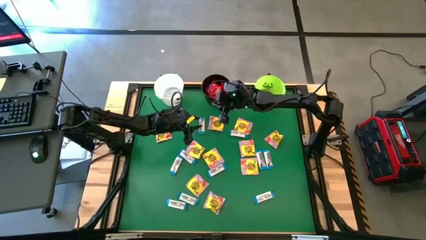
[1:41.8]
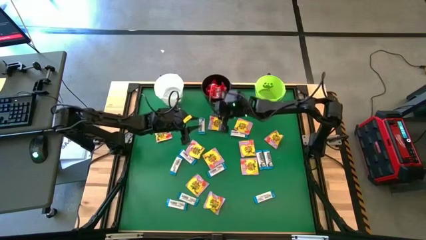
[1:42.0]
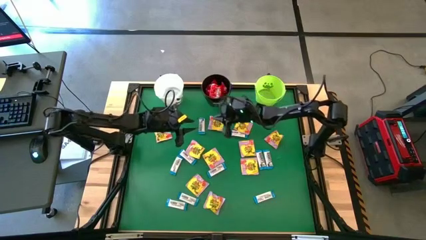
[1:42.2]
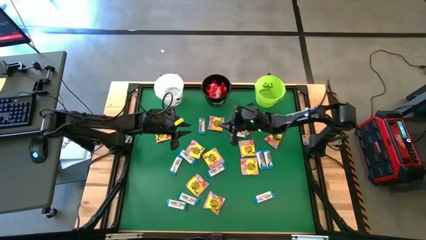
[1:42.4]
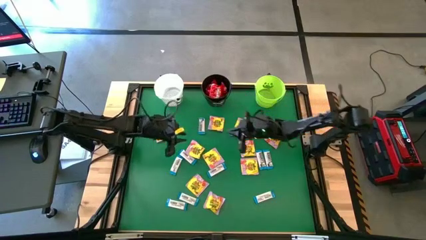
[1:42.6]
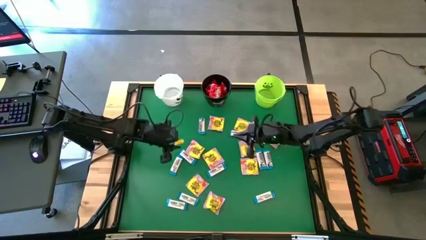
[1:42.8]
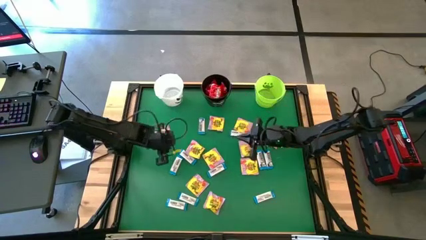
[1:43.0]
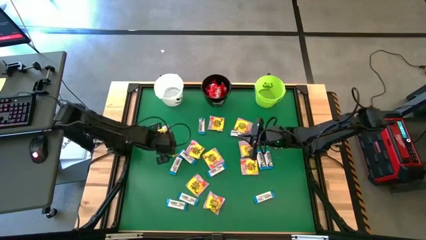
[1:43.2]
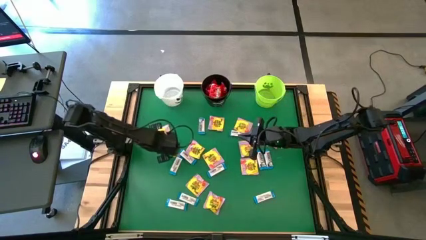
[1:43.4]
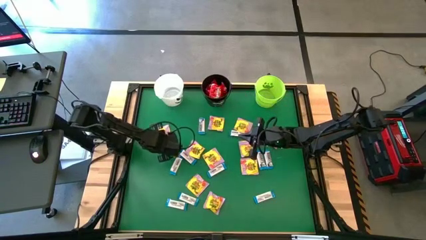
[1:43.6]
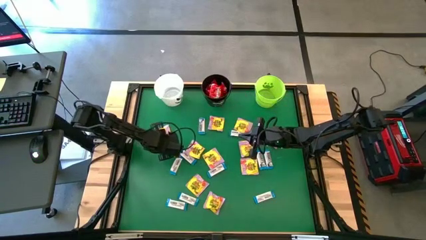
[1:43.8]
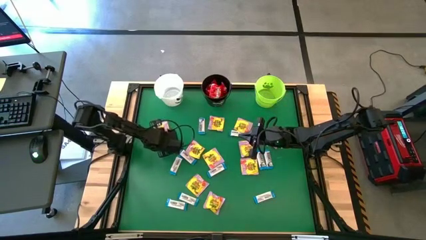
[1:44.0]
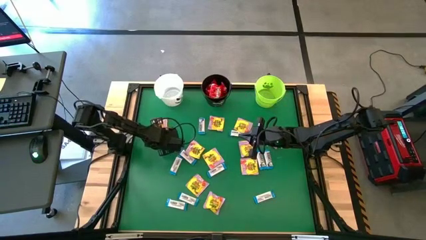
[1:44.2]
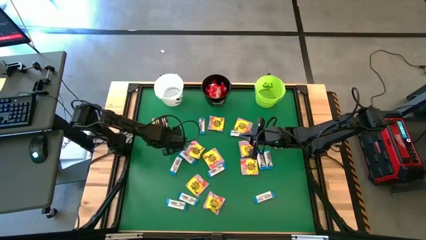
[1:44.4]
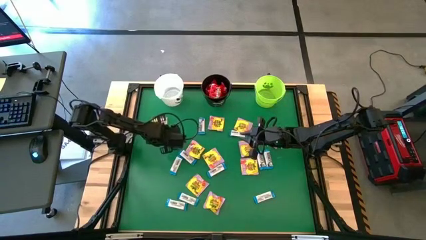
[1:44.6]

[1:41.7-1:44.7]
Task: Sort candy by brand, put in halloween buckets
Put the yellow candy into the green bucket

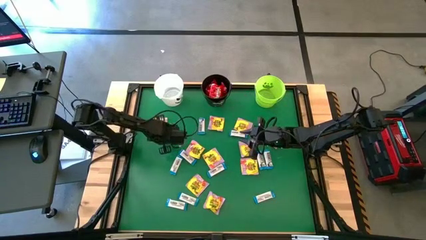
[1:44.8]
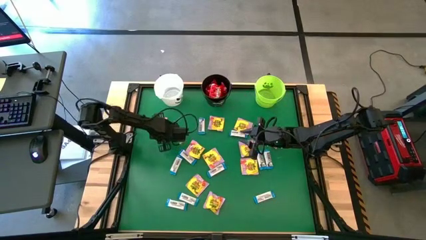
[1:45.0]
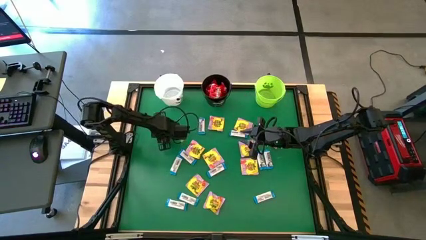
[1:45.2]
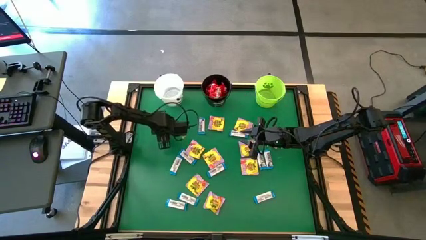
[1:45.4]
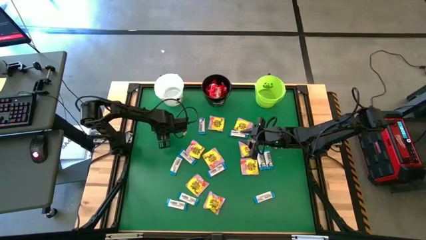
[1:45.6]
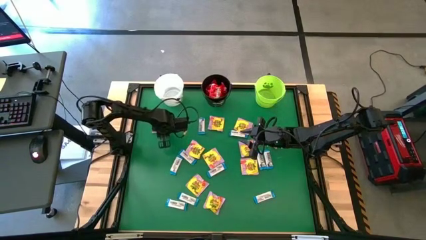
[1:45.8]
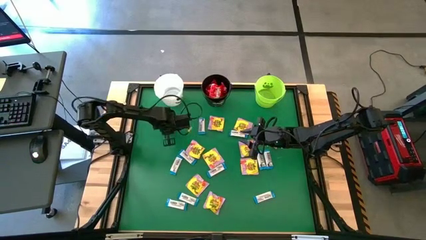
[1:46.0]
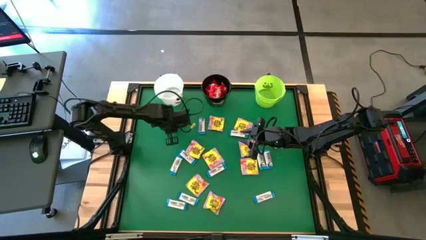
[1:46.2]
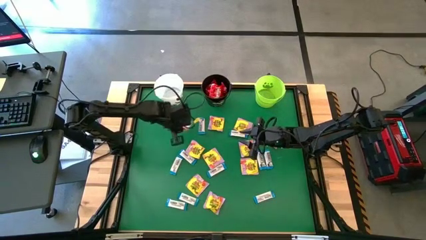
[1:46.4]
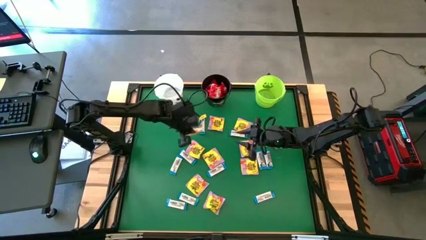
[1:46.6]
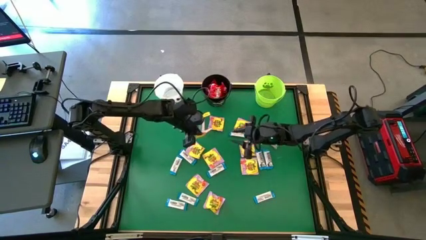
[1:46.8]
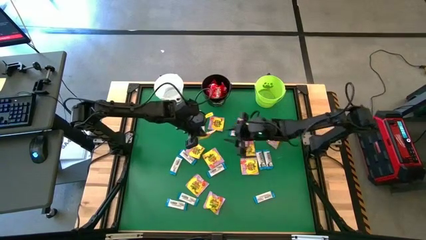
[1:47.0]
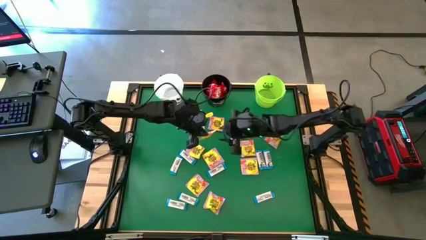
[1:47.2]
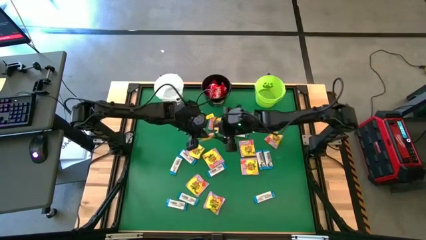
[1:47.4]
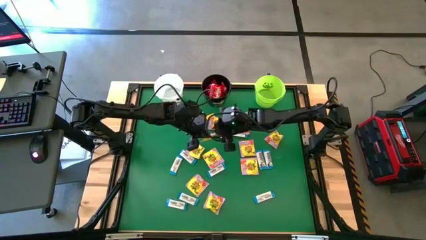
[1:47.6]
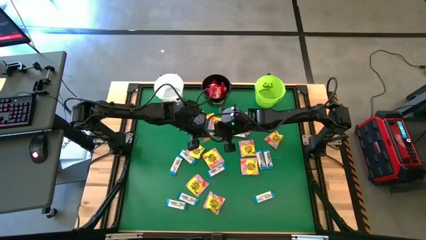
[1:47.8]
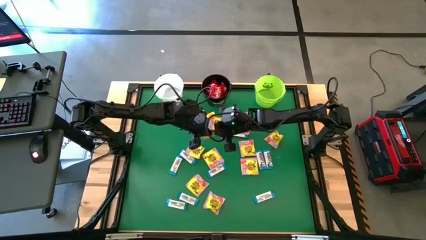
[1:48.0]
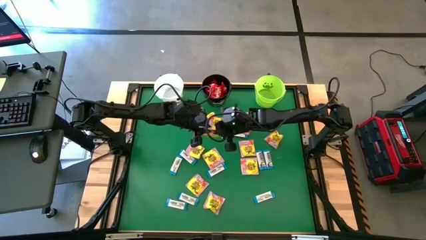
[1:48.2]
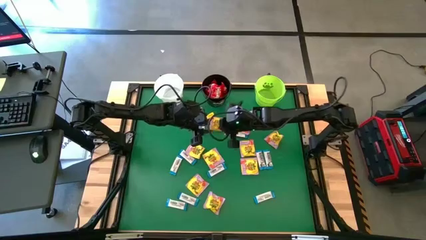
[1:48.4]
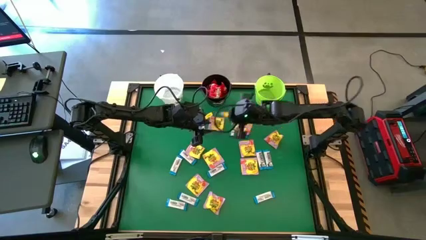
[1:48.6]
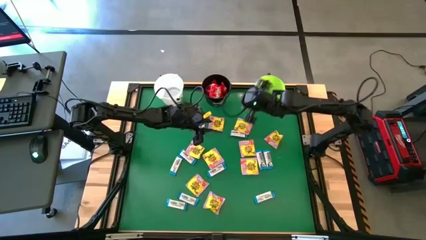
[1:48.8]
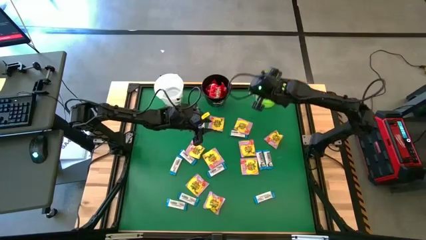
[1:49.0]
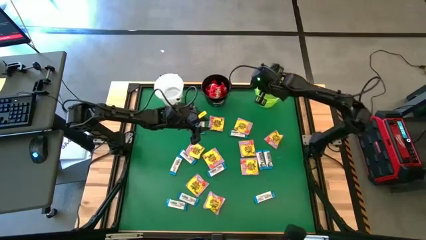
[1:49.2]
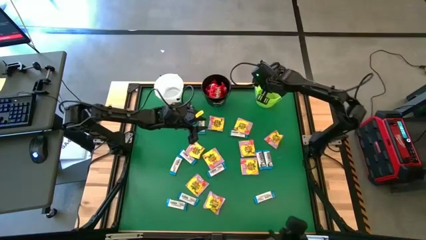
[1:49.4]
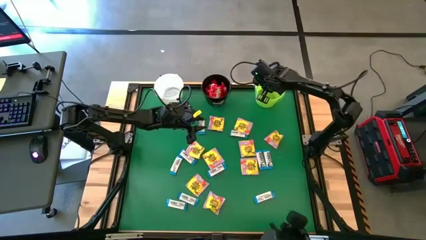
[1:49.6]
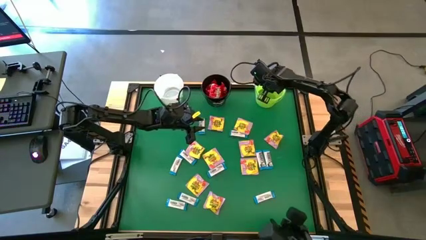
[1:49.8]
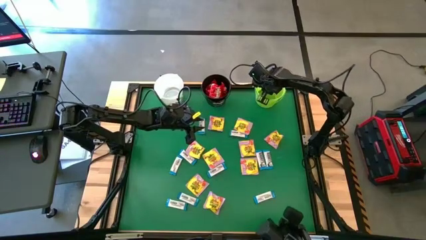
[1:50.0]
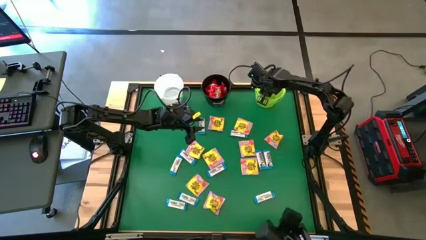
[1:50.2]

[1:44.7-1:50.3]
Put the yellow candy into the green bucket

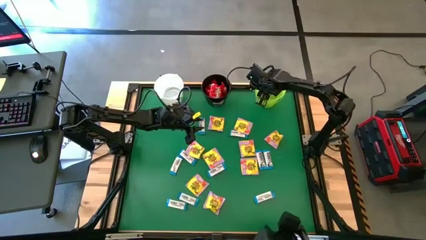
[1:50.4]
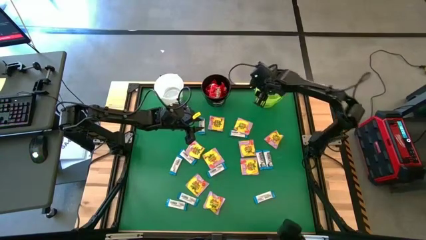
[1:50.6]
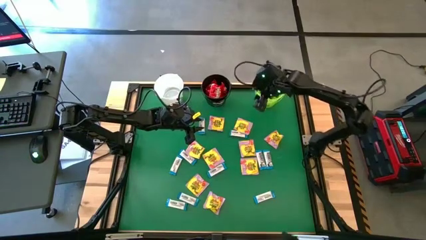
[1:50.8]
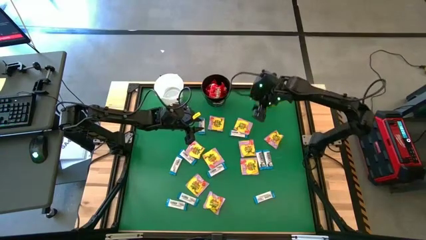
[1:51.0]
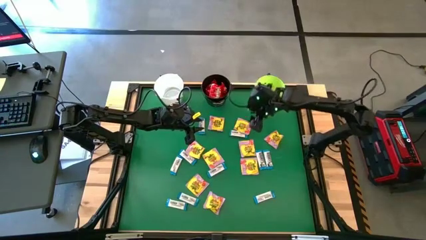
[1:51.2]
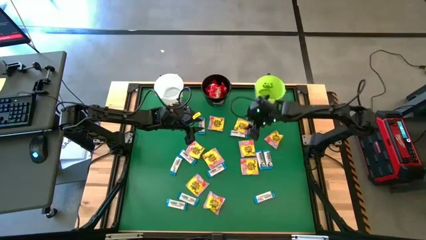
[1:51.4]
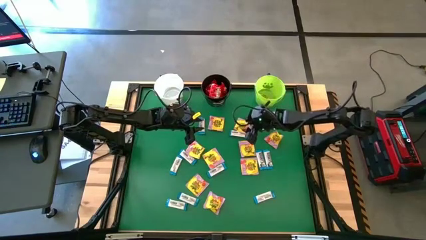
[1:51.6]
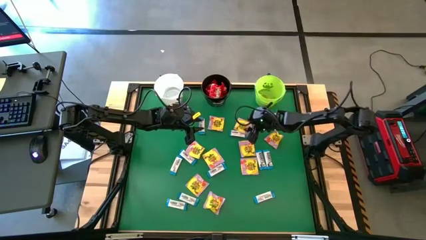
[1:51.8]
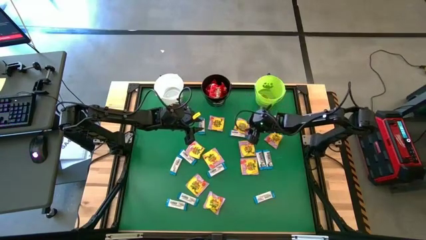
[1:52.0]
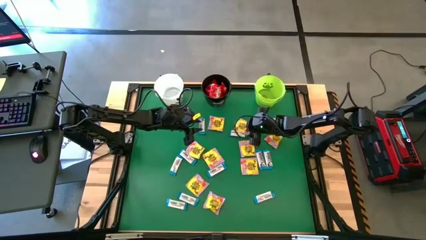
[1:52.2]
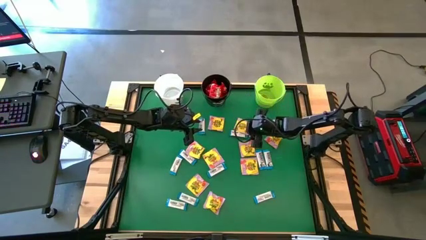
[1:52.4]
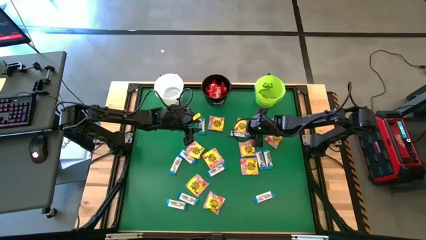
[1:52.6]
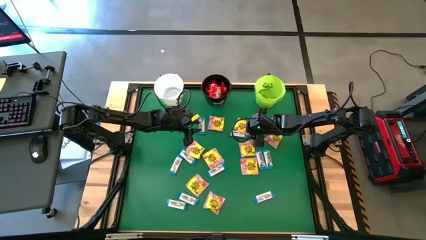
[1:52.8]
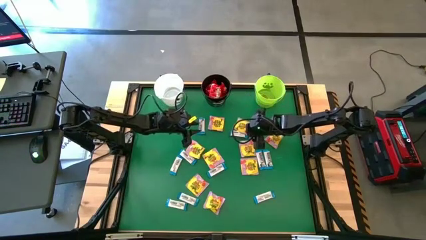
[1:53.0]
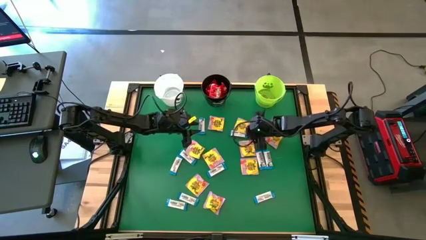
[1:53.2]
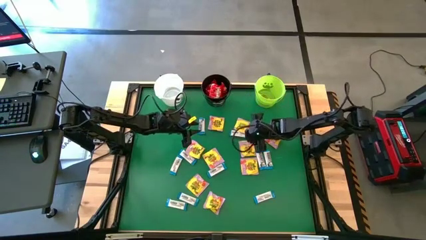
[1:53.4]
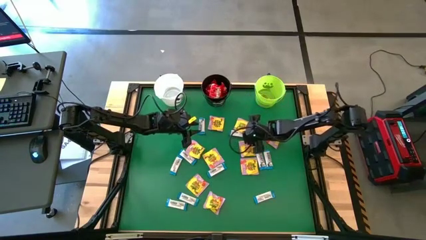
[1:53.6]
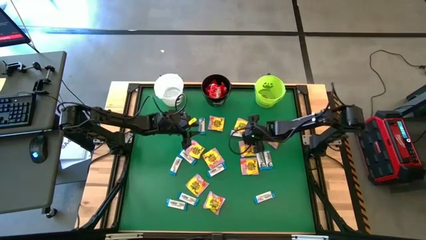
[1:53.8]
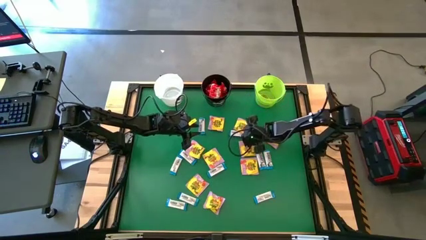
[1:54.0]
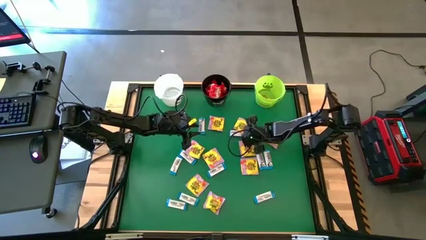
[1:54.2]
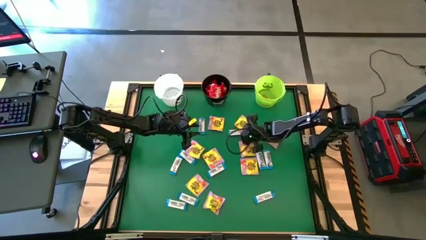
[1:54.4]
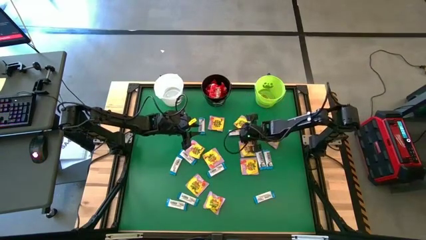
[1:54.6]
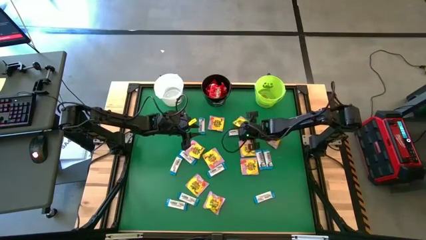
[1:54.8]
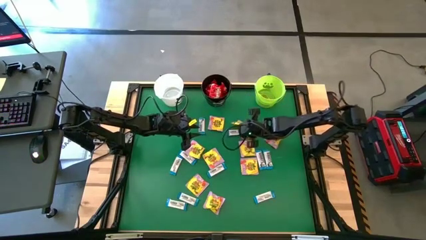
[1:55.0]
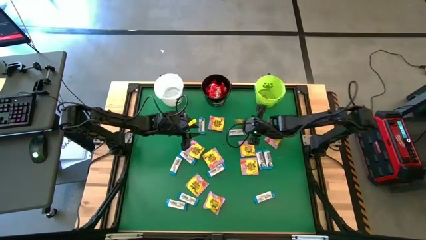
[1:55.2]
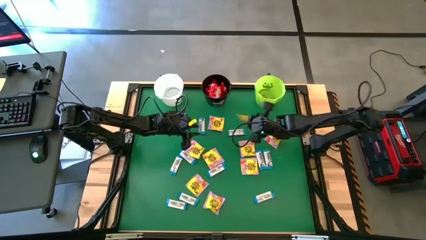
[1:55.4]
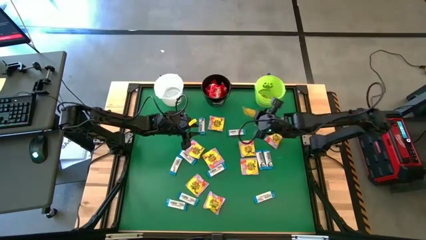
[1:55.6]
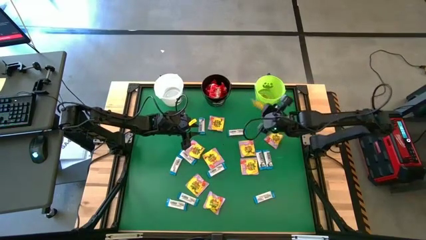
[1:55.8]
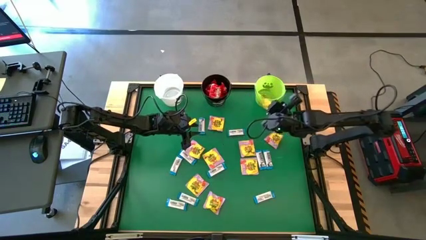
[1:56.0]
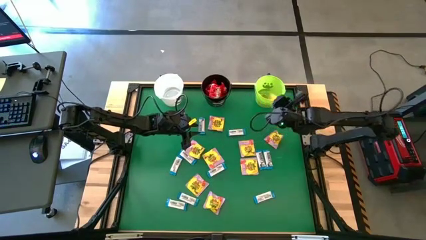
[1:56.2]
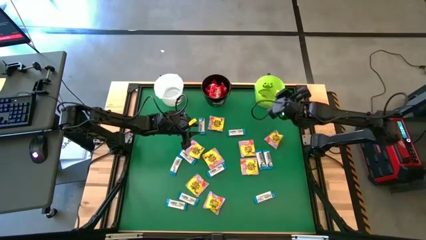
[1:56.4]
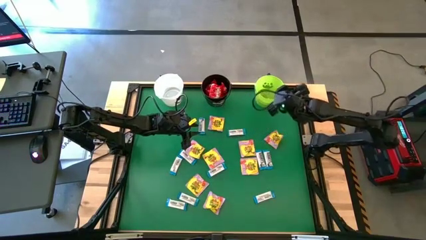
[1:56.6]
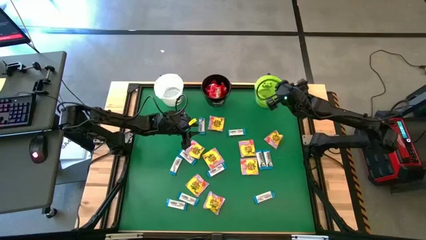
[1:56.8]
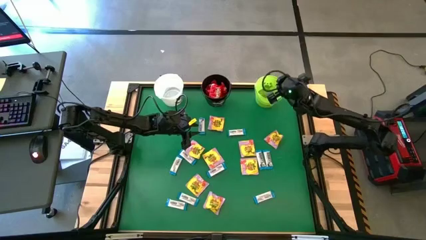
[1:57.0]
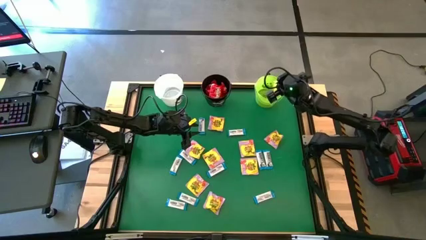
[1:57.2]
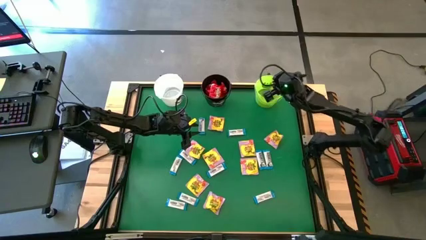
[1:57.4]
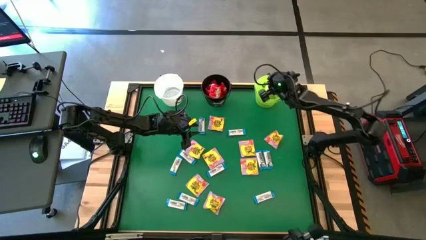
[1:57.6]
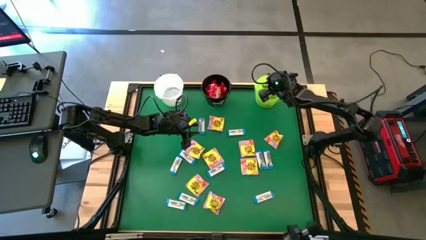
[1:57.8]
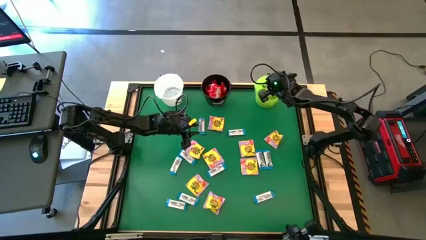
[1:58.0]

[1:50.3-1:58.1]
Put the yellow candy into the green bucket
